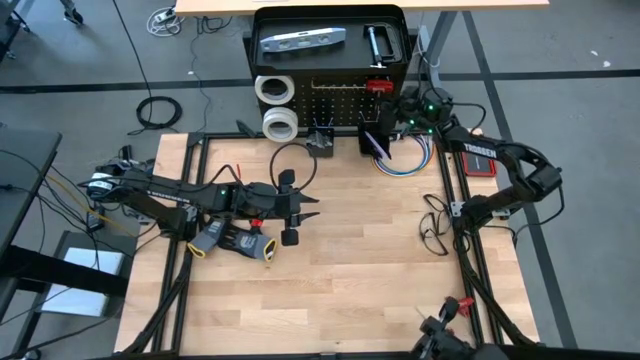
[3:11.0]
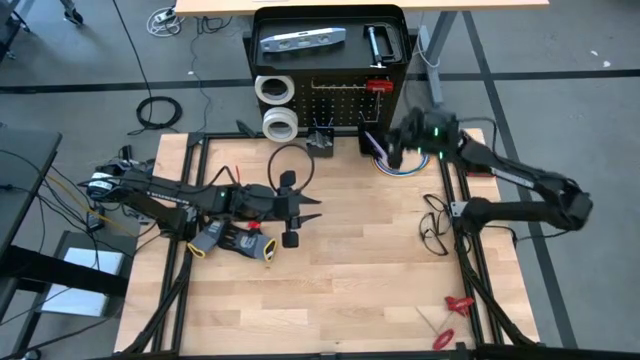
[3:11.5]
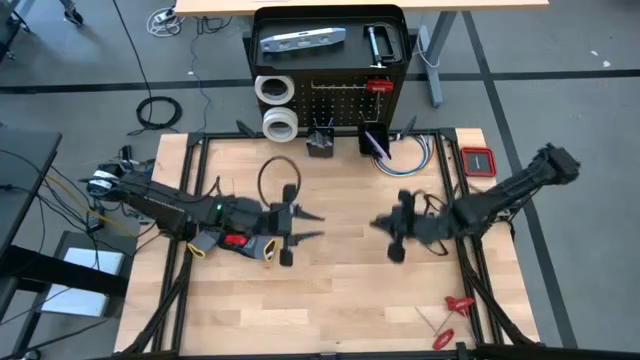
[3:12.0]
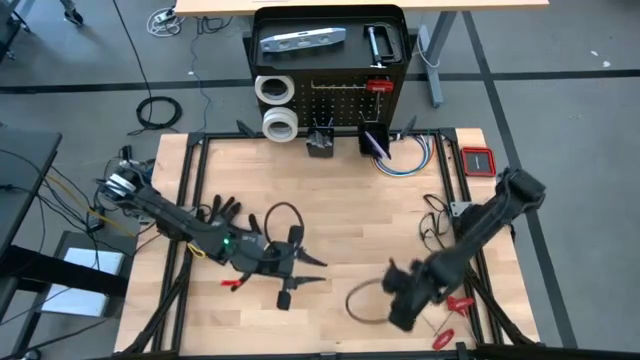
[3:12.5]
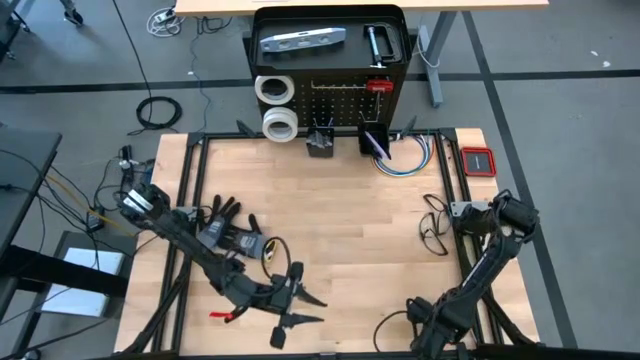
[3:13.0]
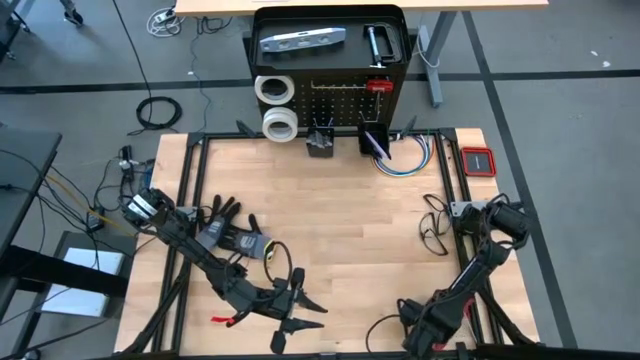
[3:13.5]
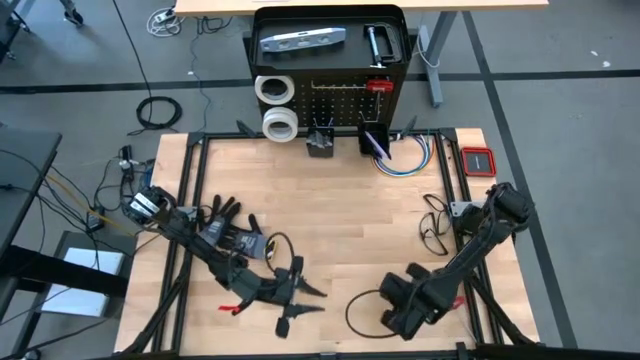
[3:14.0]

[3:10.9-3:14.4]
Task: Hang tools onto peg board
Hang the allen wrench on the peg board

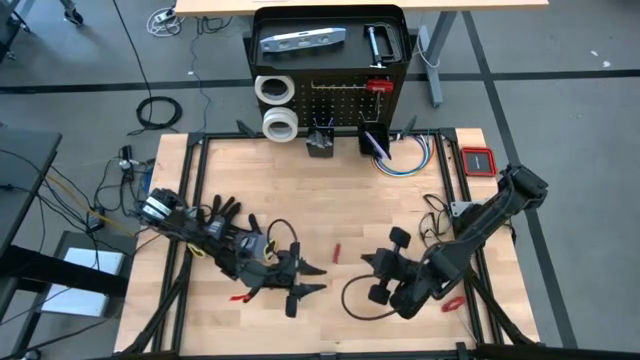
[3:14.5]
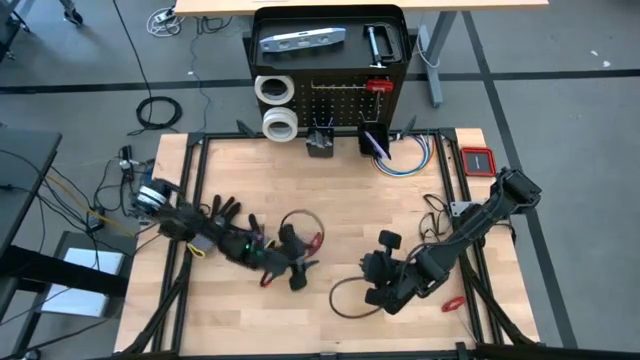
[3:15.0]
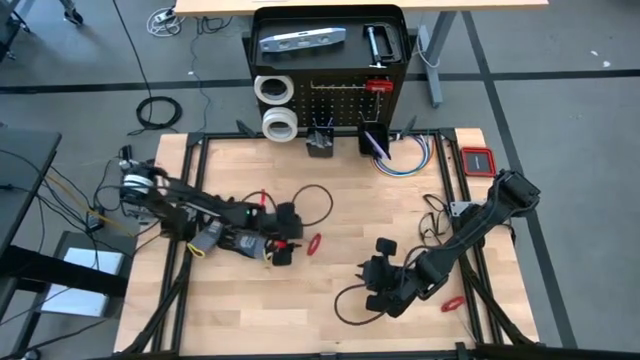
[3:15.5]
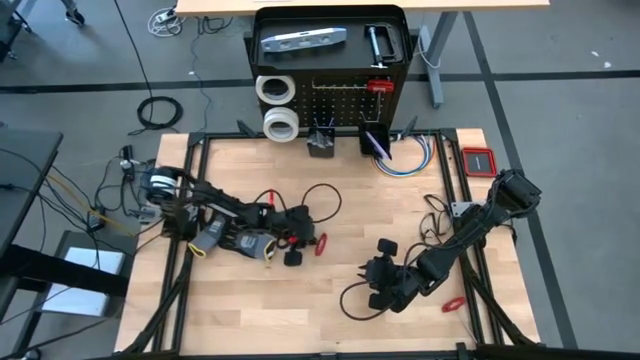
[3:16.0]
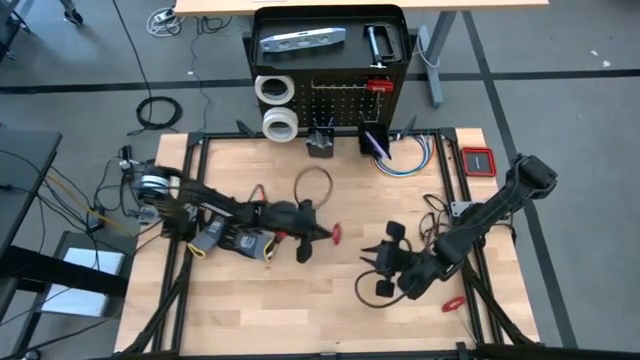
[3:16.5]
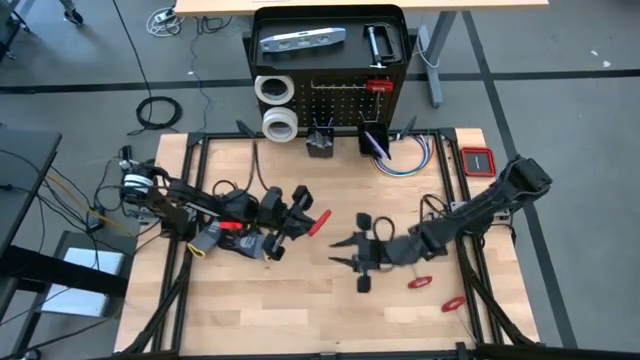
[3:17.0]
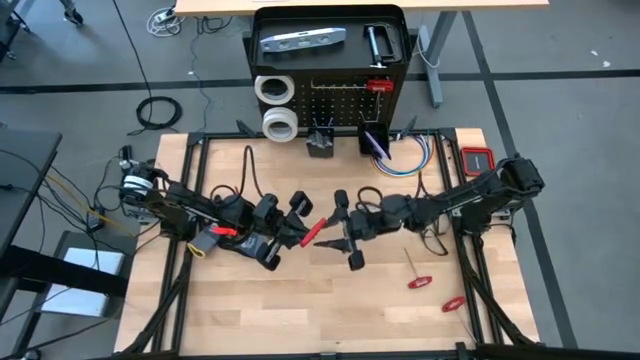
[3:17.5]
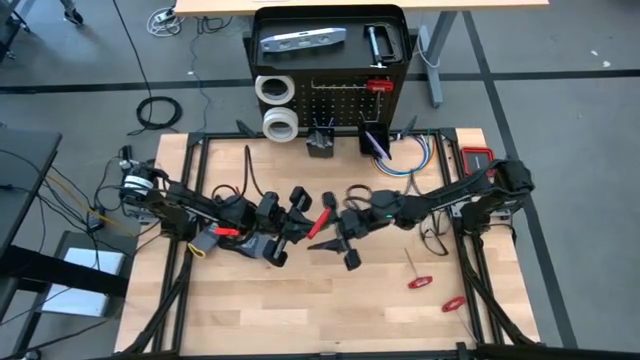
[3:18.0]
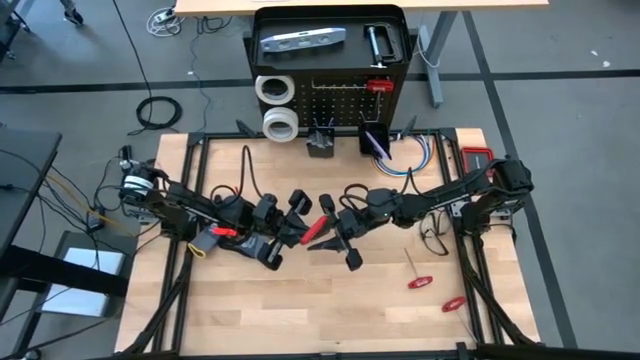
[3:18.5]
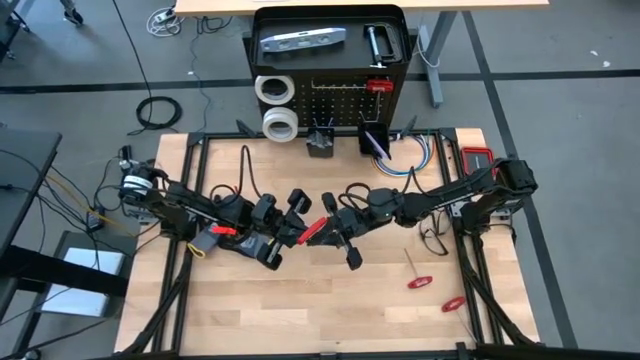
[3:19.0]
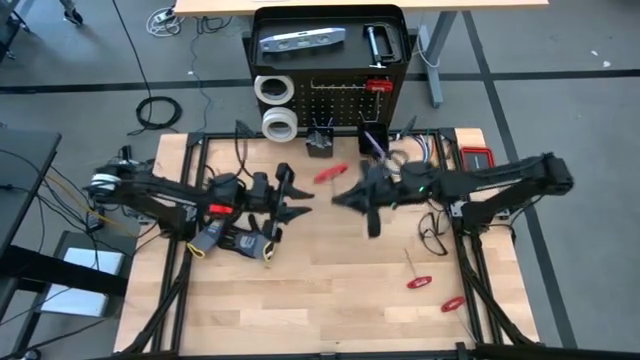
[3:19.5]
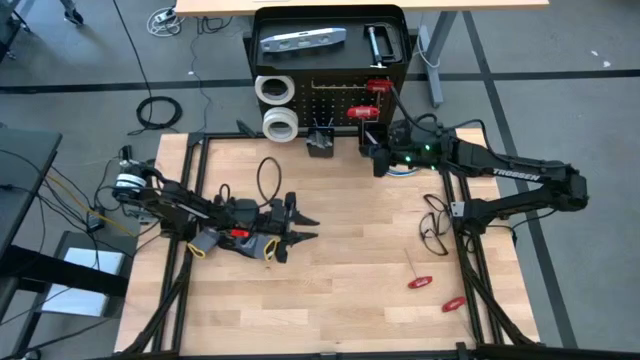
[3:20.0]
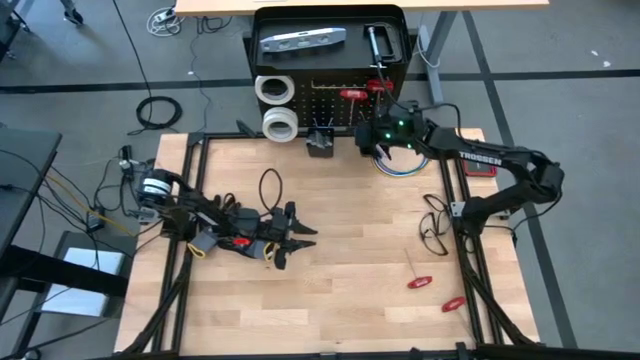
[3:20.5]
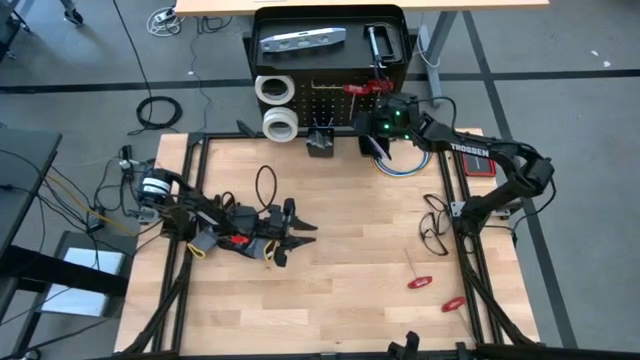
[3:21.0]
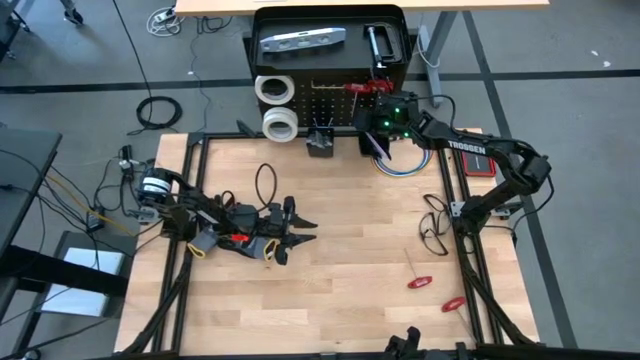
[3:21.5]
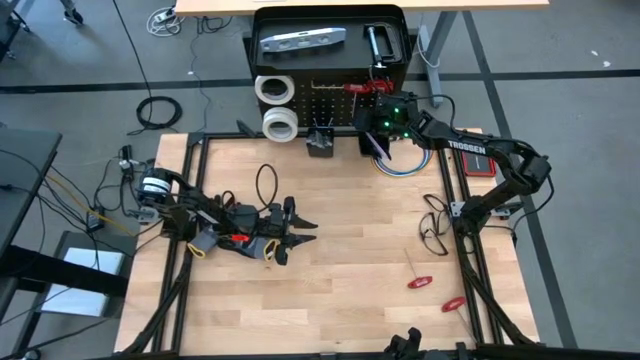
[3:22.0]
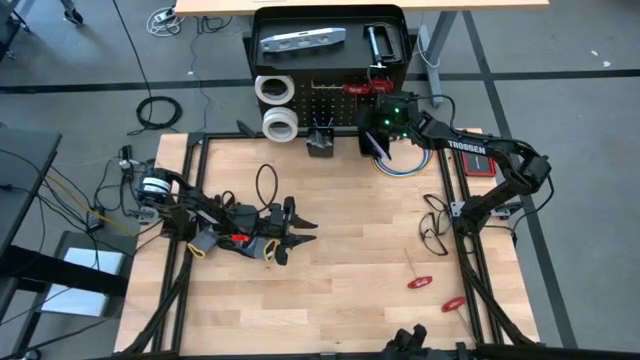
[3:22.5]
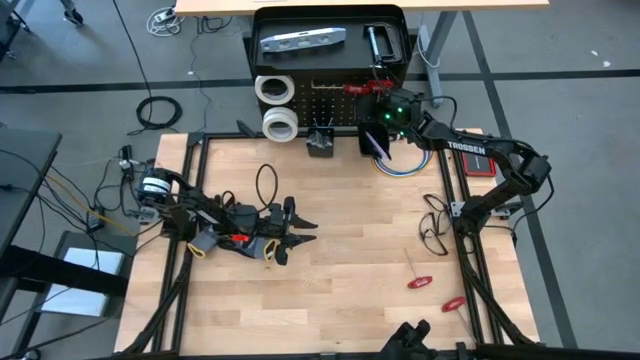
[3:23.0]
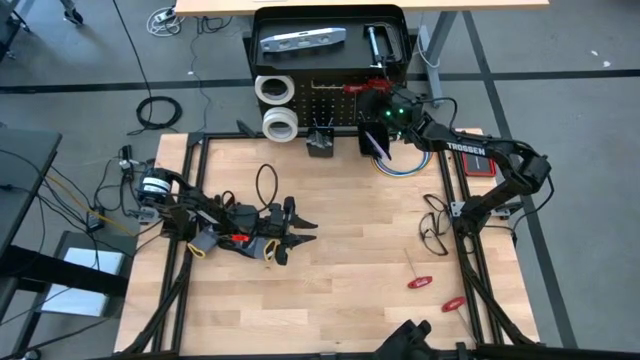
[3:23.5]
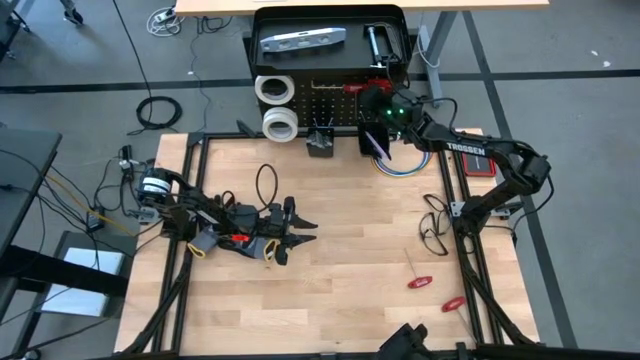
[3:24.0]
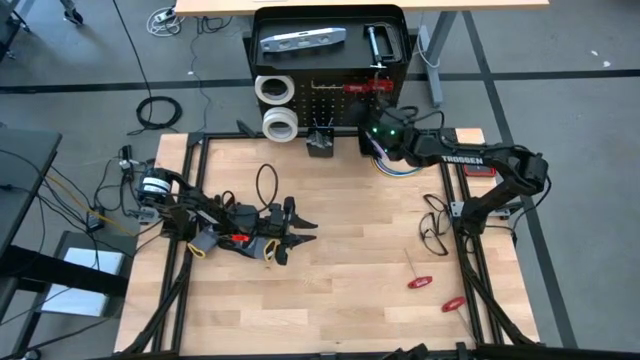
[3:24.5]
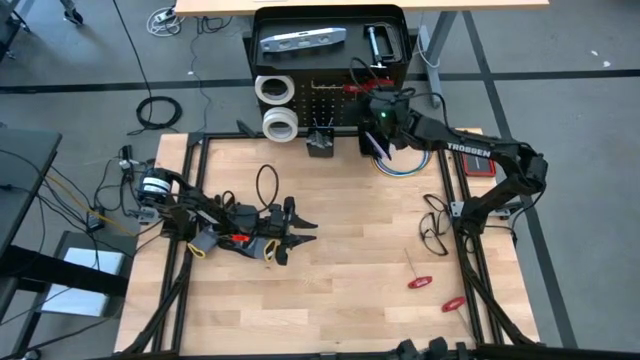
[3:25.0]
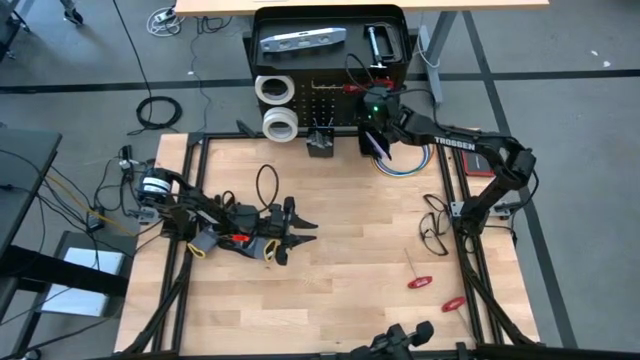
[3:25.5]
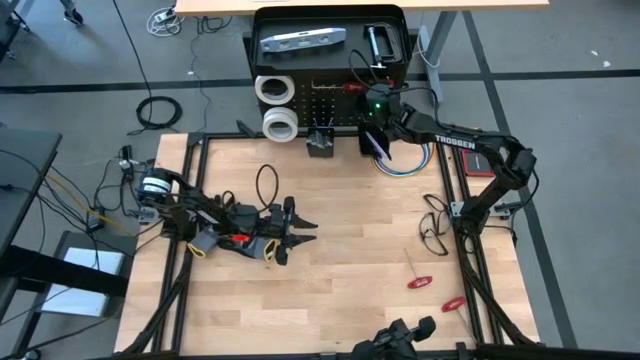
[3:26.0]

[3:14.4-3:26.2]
Hang the allen wrench on the peg board

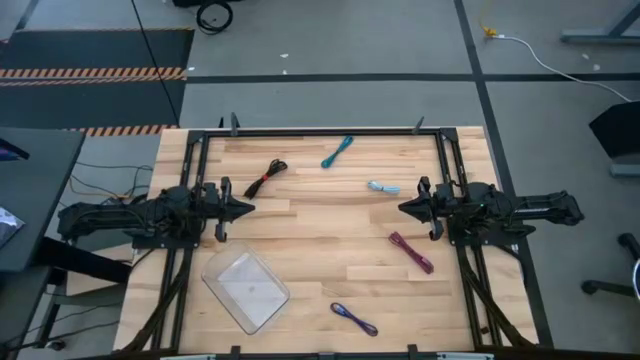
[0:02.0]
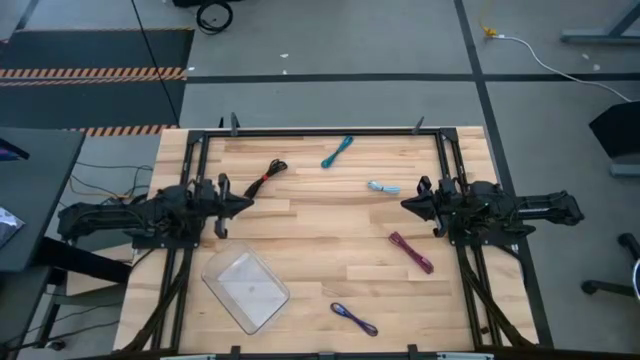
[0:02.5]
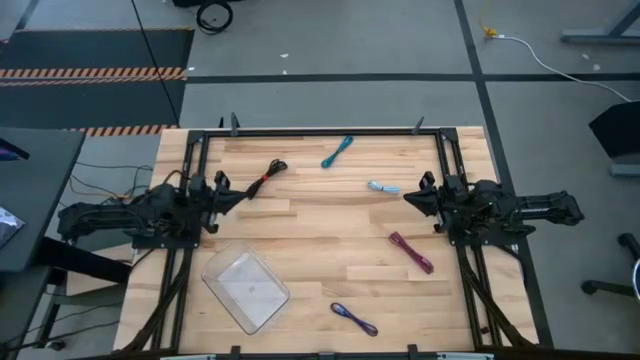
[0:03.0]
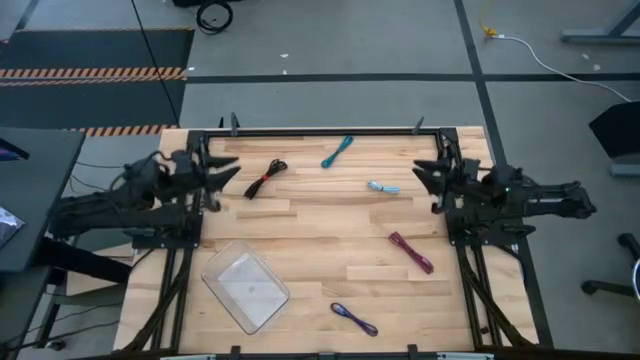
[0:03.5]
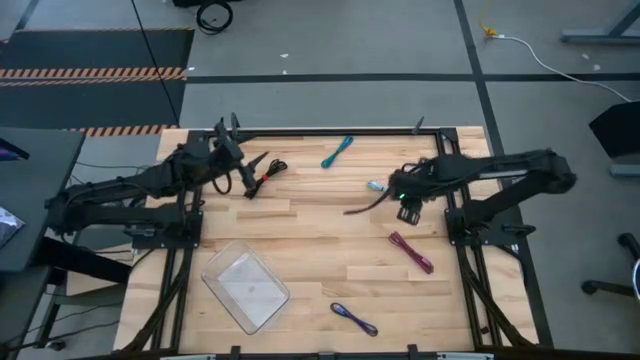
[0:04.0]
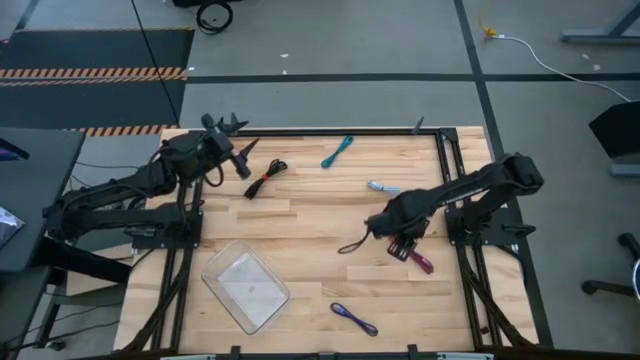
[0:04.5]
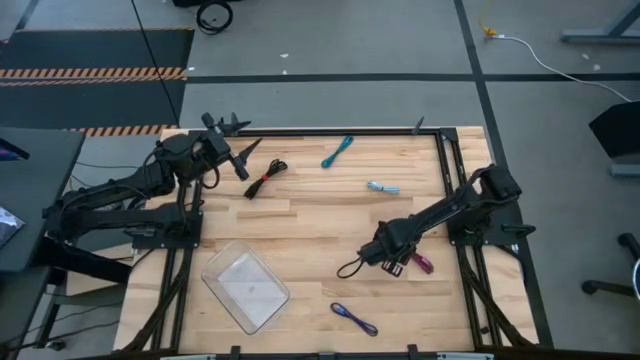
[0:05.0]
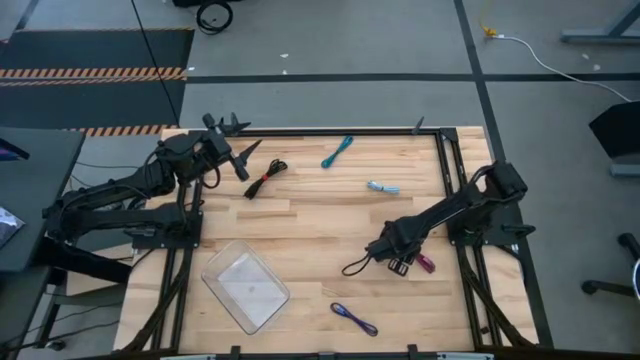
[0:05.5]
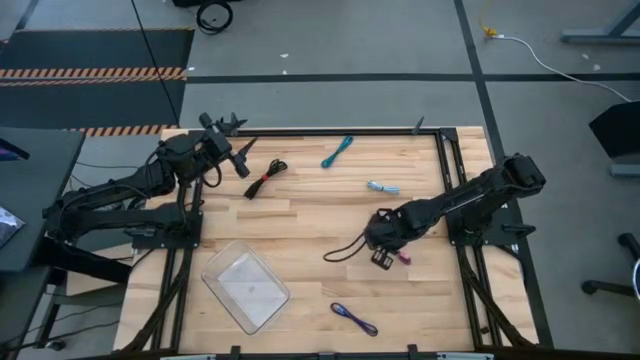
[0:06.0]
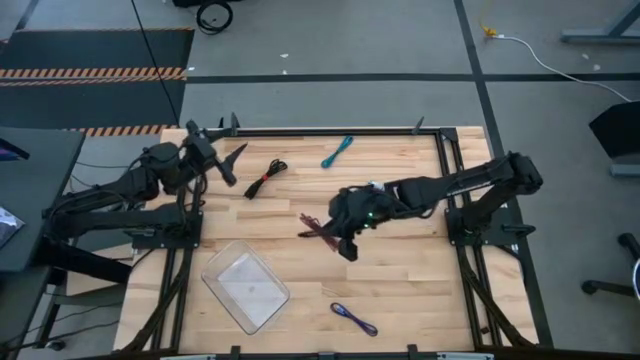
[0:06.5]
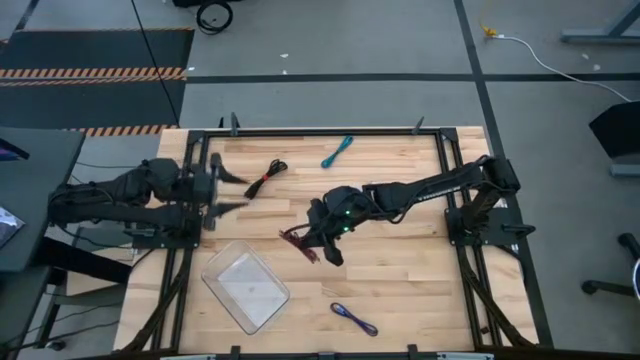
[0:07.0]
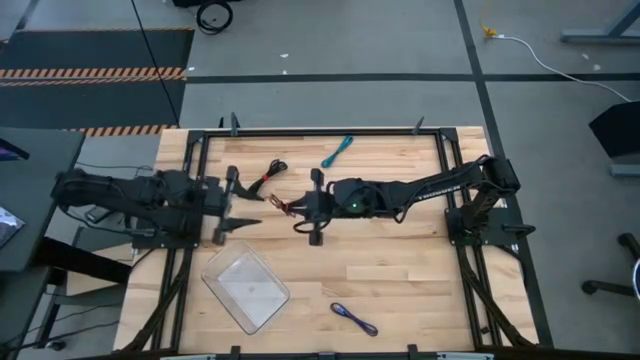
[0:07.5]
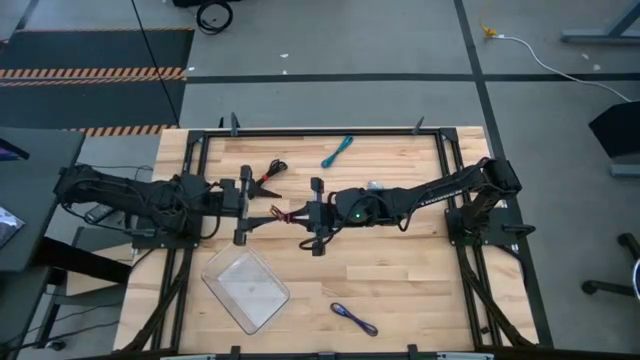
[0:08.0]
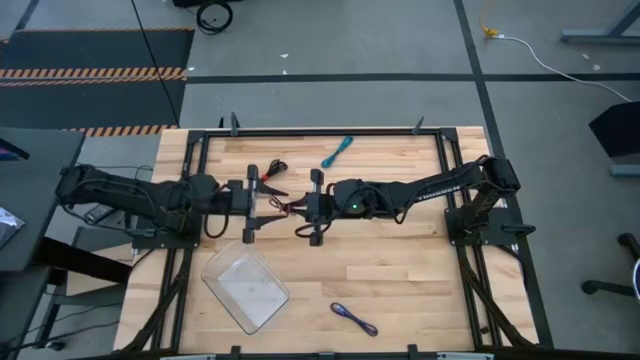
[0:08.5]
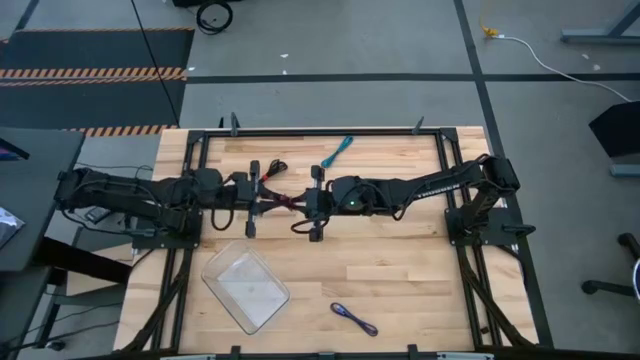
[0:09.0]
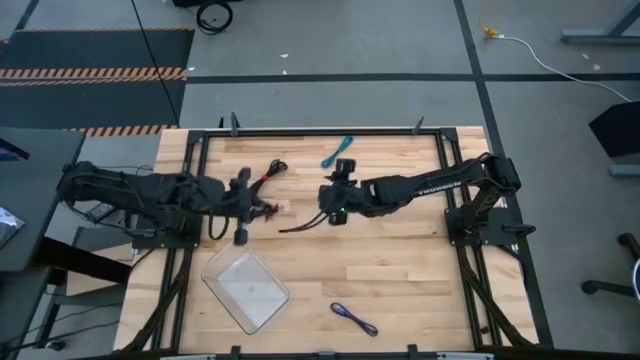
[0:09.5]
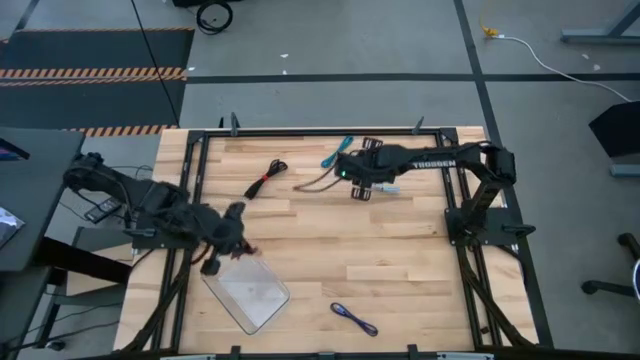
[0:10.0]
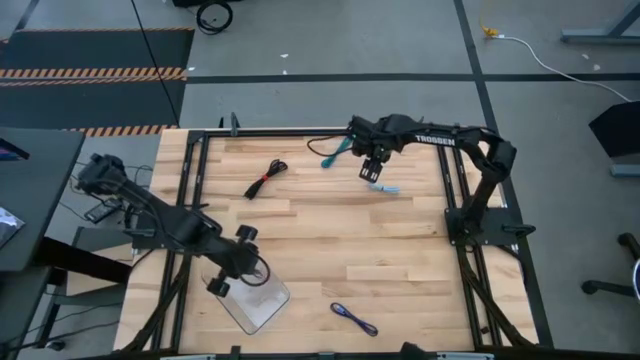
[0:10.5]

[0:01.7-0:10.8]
Task: Pick and place USB-C Cables
Put the black pink charger cable into the transparent bin
